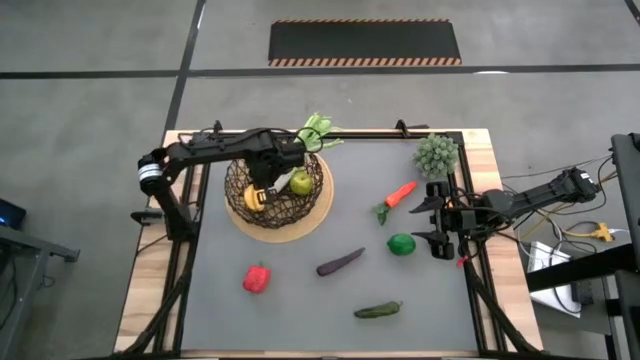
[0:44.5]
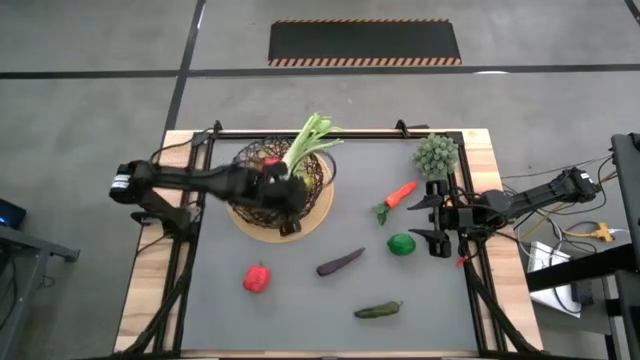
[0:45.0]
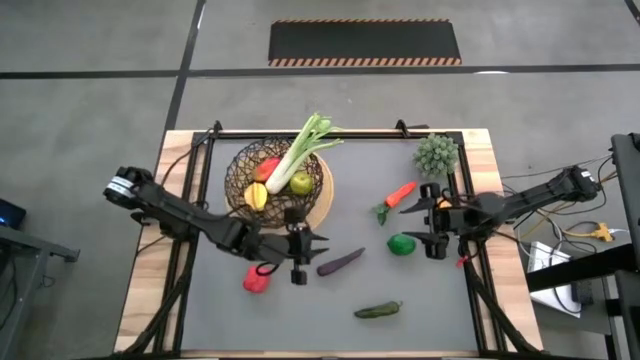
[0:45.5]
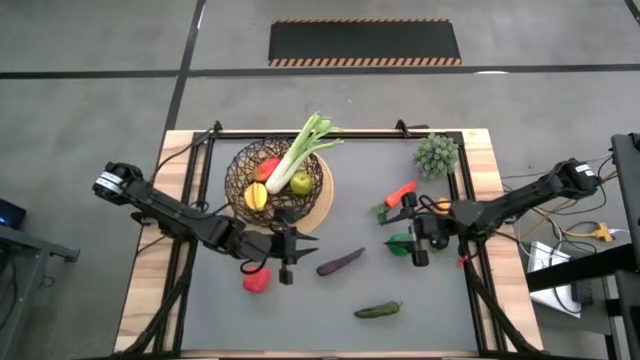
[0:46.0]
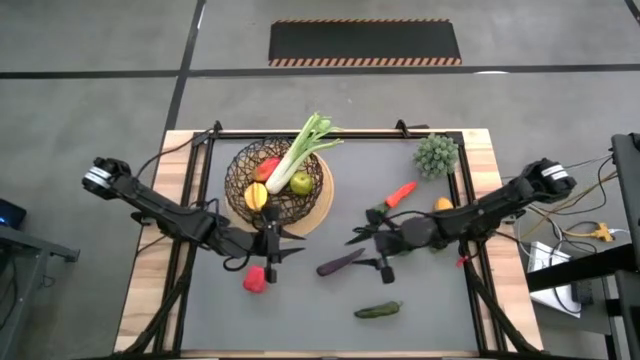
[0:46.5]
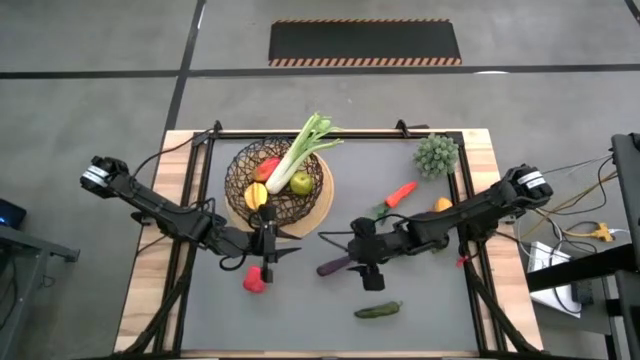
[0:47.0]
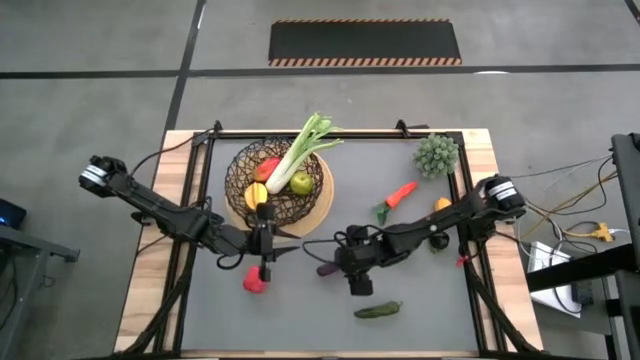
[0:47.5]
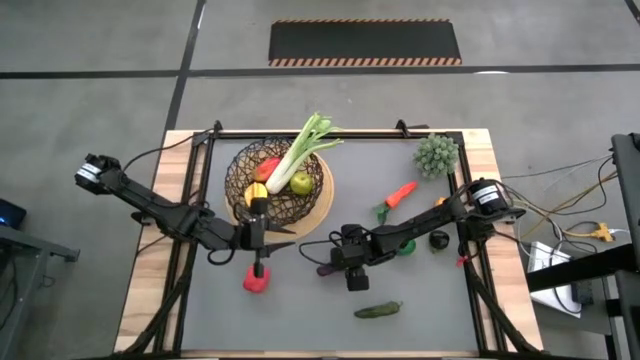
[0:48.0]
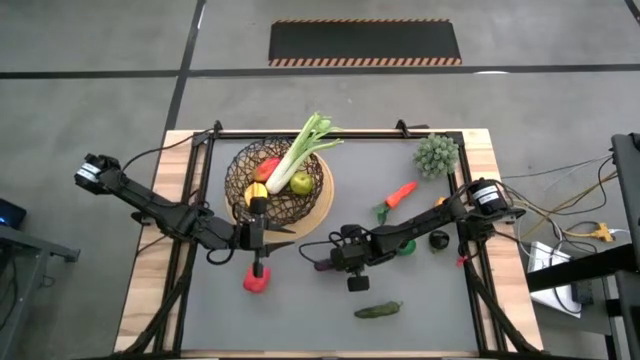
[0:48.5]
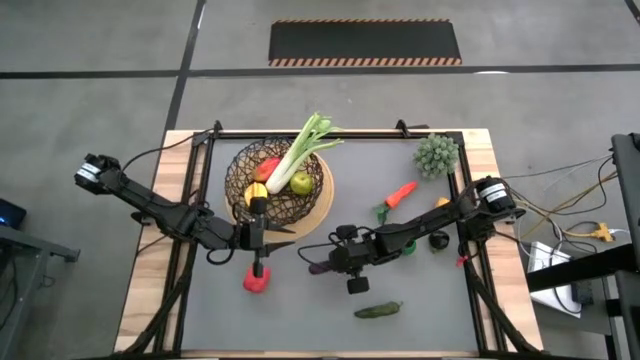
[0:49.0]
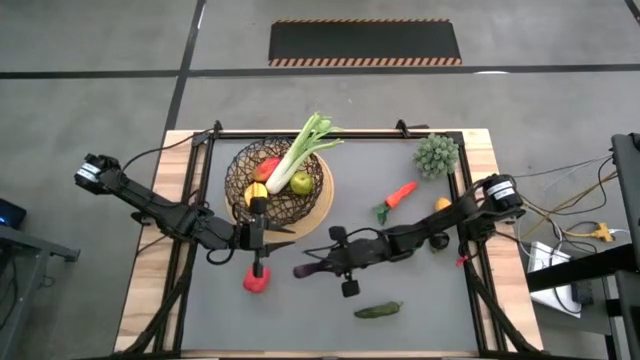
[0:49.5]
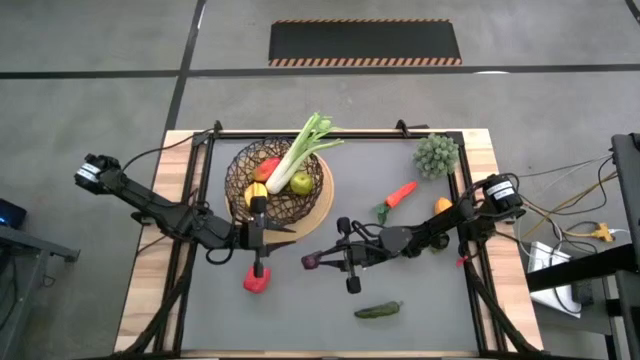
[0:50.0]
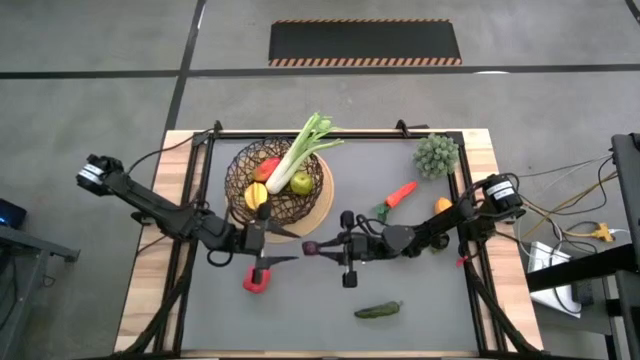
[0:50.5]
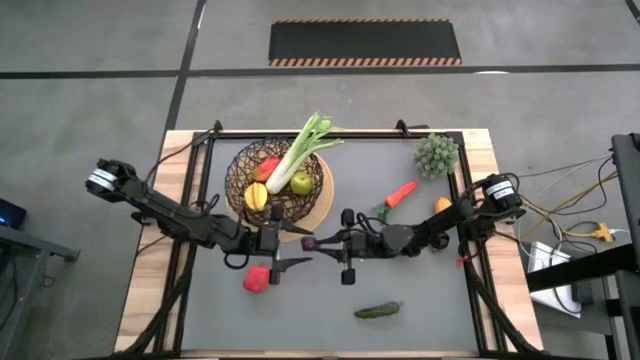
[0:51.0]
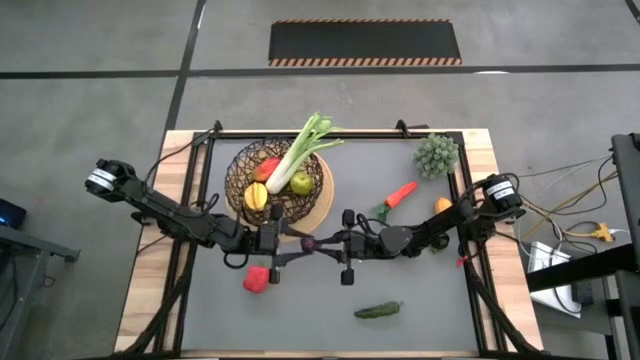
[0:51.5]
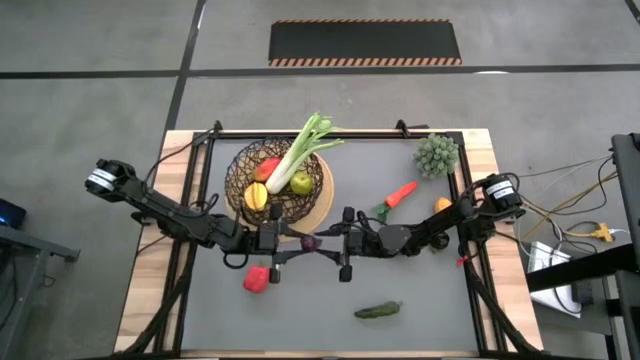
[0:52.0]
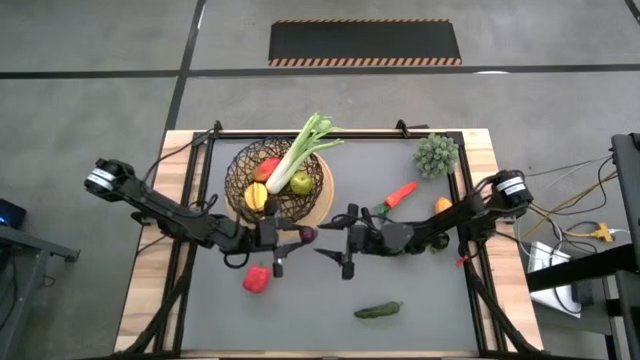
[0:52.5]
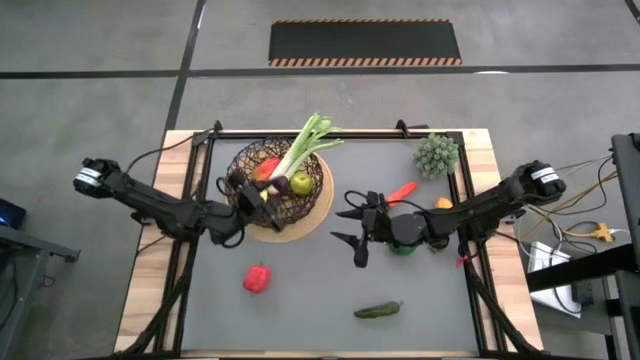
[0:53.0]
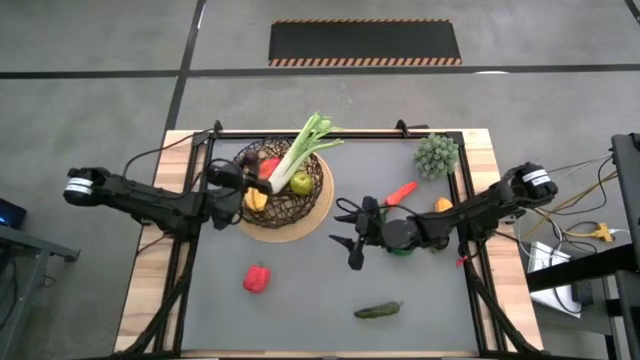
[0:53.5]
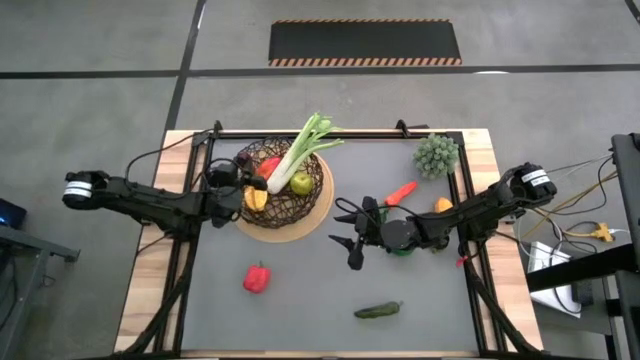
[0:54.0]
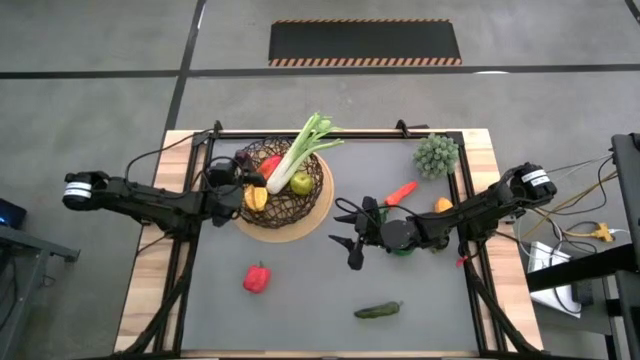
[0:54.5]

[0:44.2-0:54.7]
Task: Build produce basket
Put the violet eggplant into the black wire basket

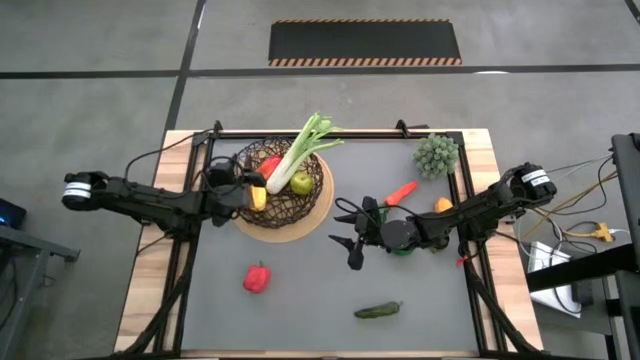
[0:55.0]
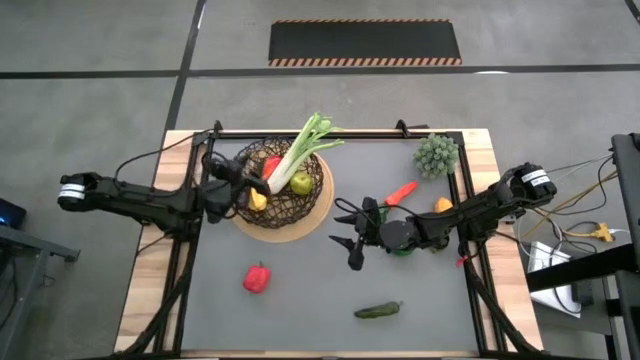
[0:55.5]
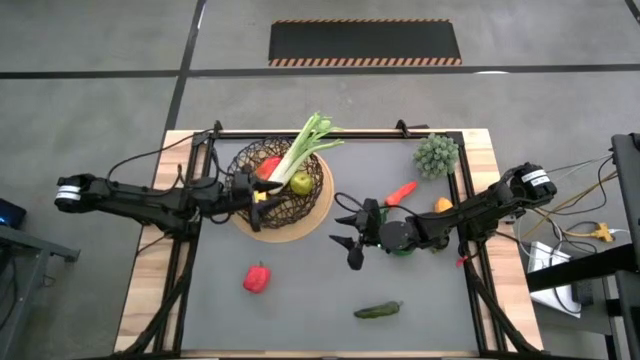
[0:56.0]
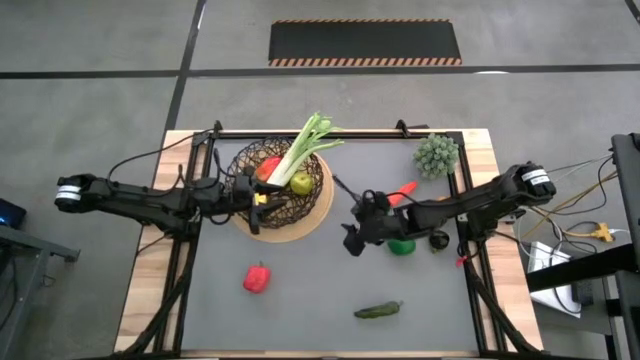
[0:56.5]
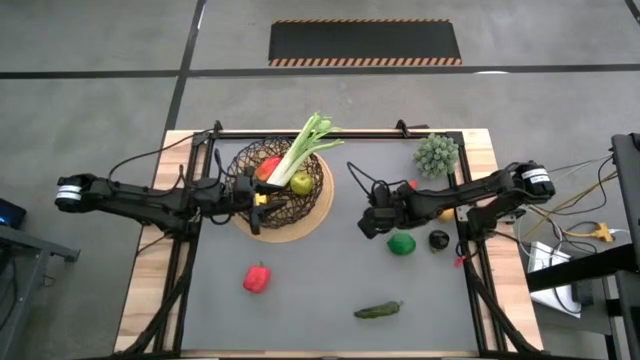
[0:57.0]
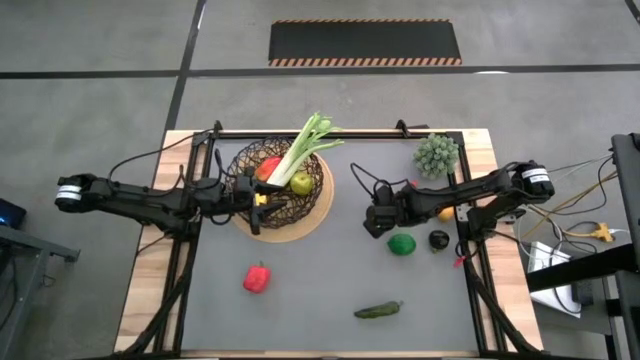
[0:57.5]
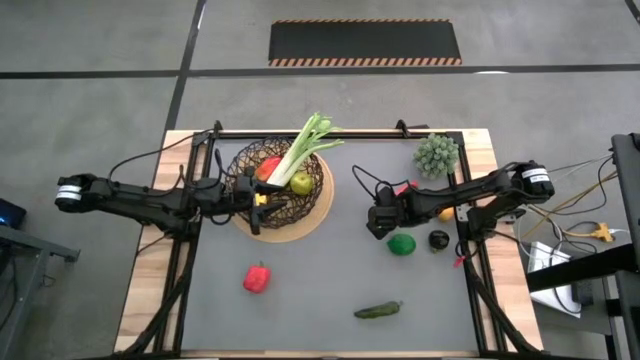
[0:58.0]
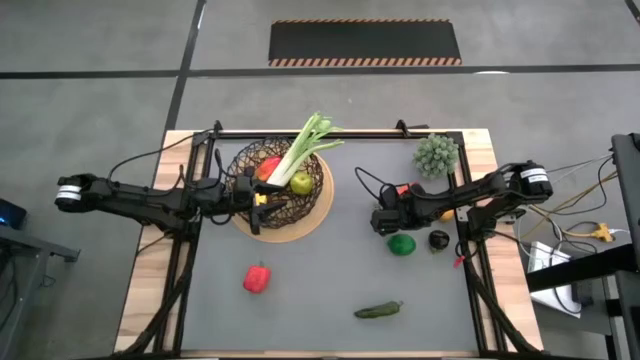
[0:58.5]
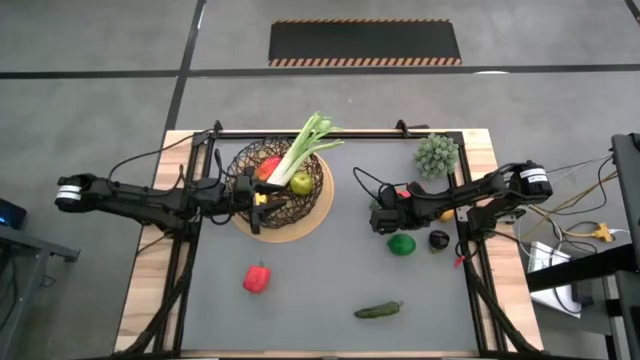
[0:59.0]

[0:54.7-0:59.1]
Put the orange carrot into the black wire basket

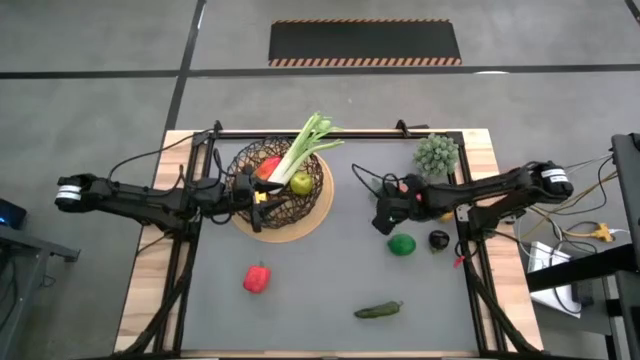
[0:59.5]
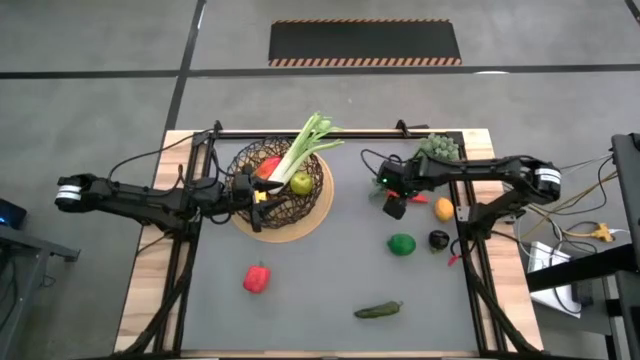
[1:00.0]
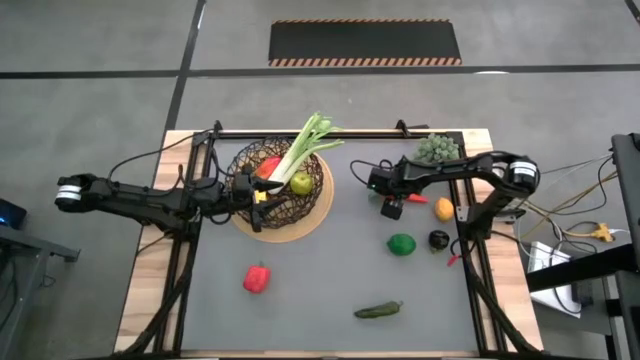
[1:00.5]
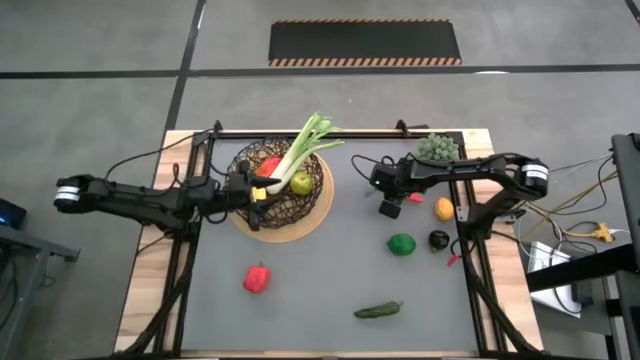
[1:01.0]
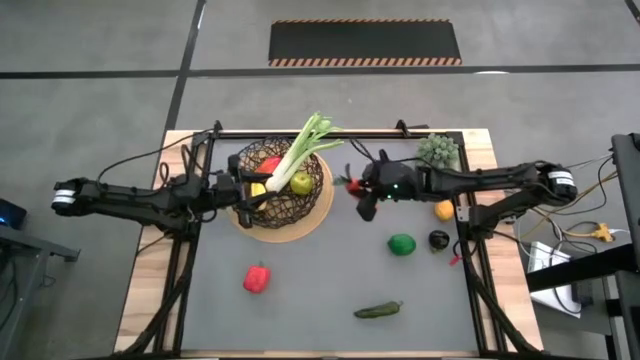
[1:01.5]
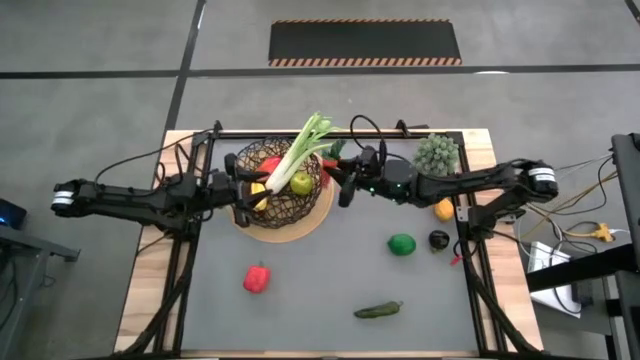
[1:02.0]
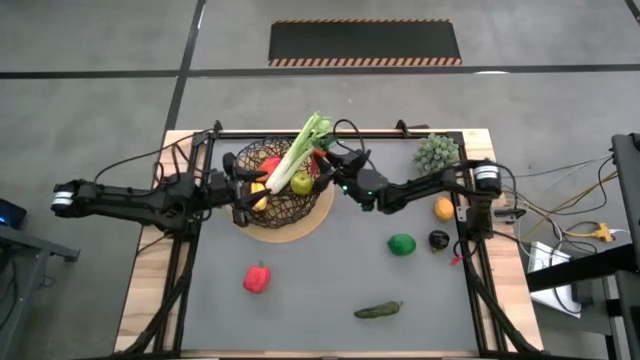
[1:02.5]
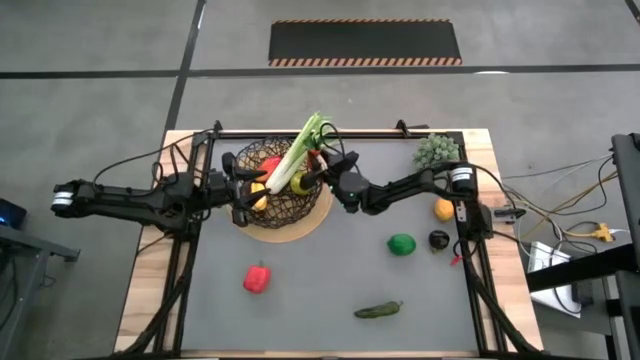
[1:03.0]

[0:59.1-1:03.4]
Put the orange carrot into the black wire basket

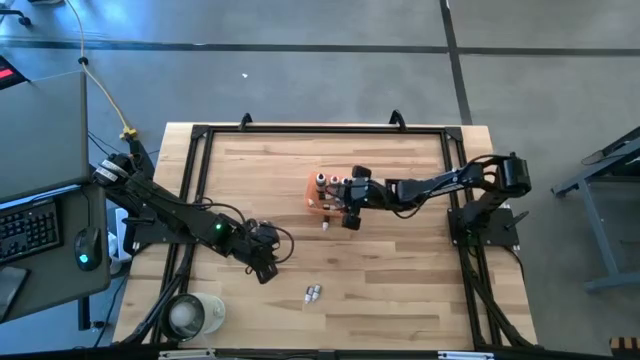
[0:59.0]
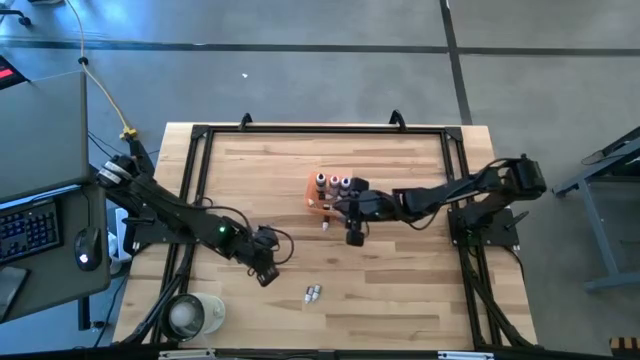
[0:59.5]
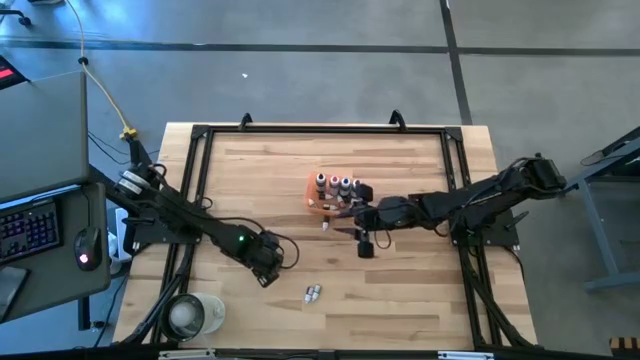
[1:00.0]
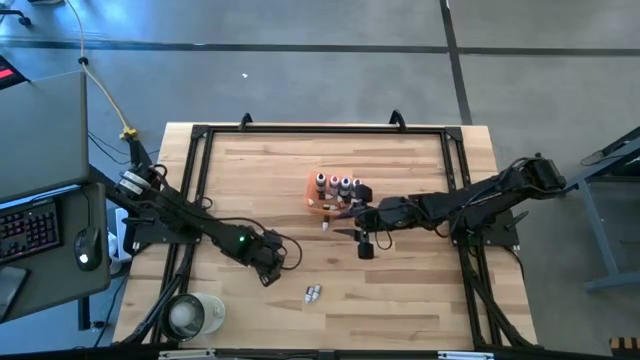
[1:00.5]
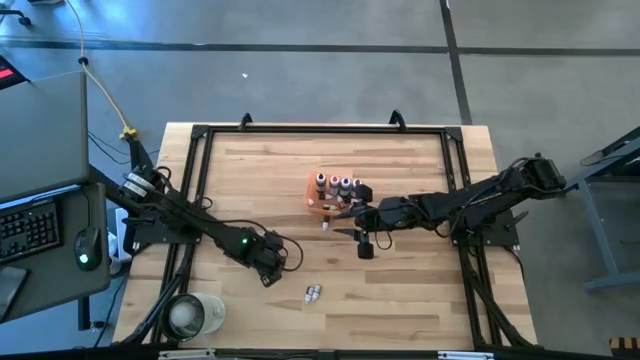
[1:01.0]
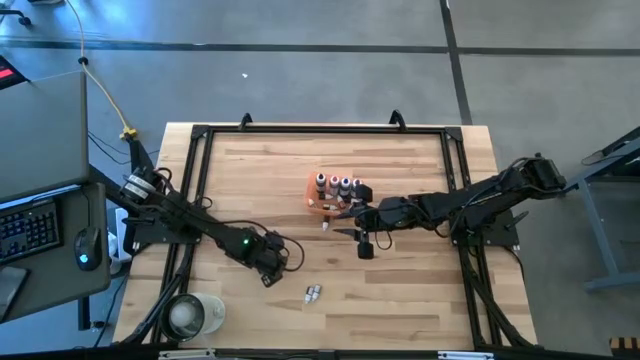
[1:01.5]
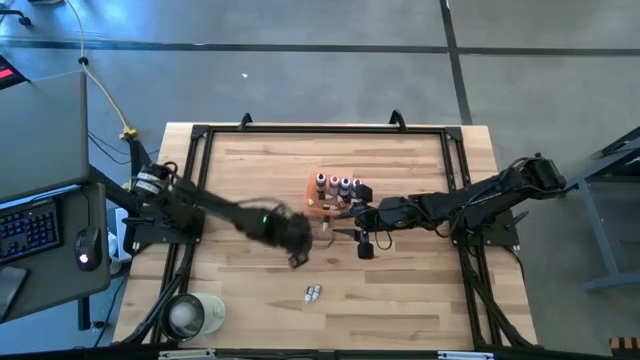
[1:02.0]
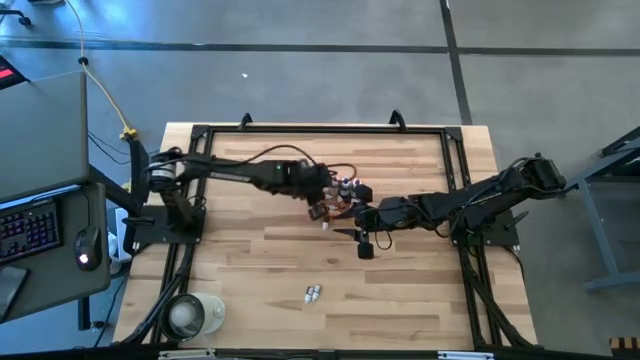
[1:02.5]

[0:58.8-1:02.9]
Task: Pick & Place food coloring
Put the small red food coloring bottle into the orange bin
